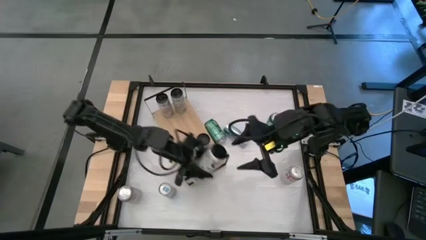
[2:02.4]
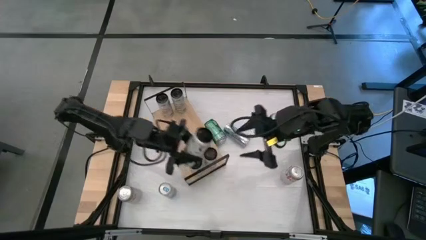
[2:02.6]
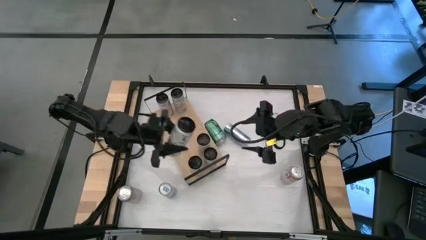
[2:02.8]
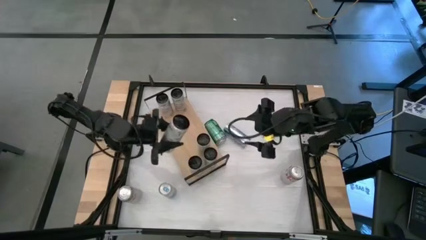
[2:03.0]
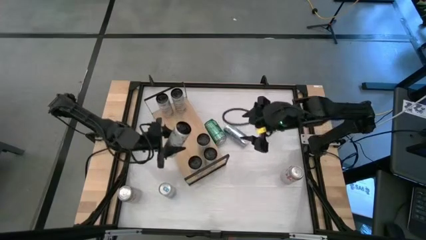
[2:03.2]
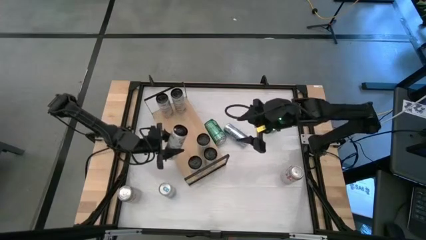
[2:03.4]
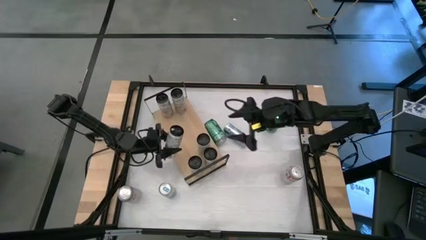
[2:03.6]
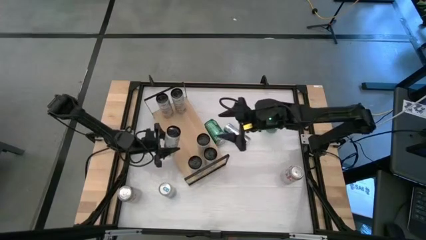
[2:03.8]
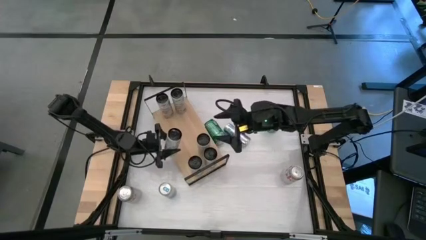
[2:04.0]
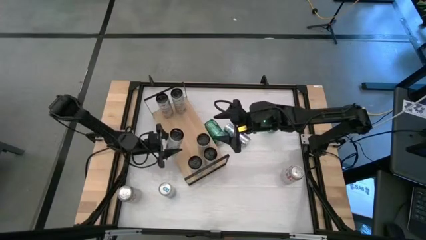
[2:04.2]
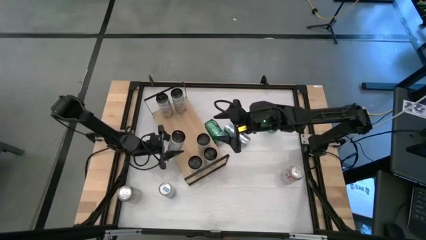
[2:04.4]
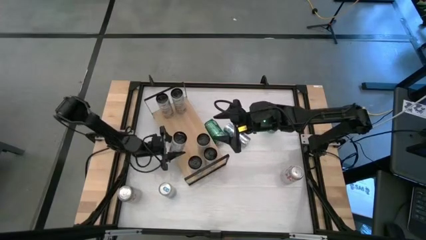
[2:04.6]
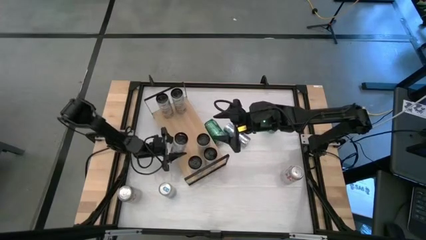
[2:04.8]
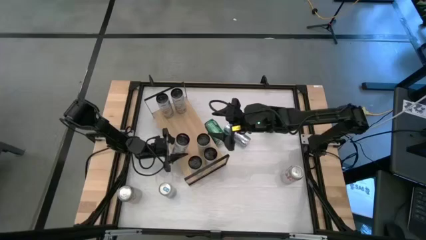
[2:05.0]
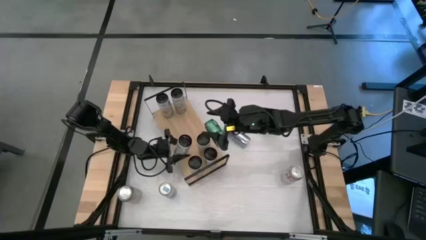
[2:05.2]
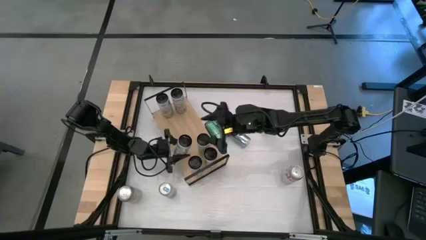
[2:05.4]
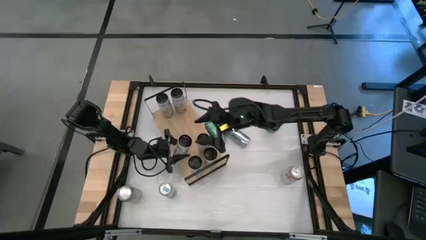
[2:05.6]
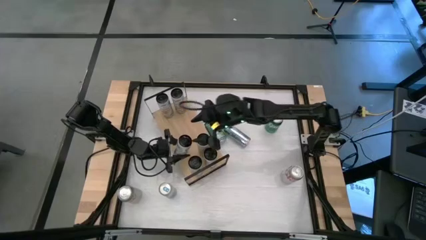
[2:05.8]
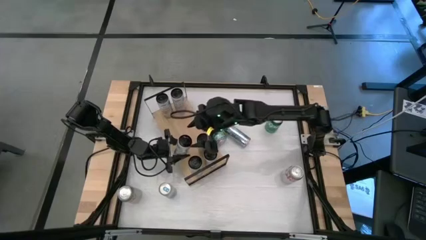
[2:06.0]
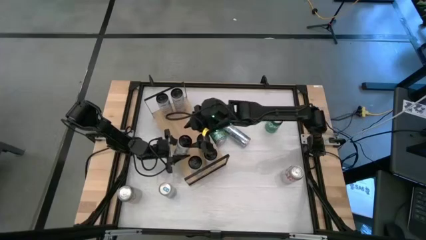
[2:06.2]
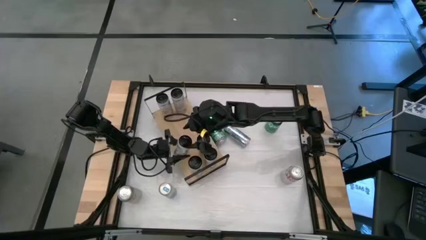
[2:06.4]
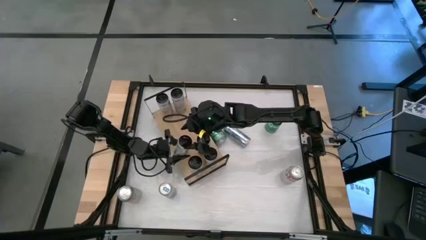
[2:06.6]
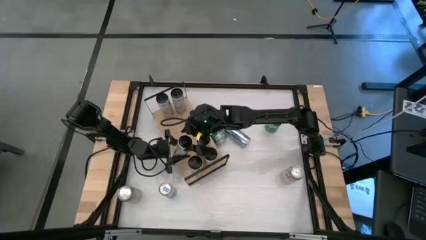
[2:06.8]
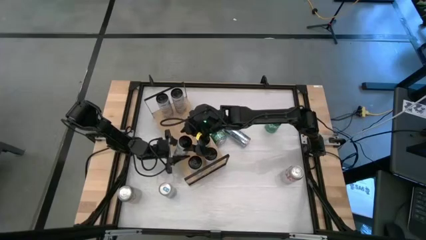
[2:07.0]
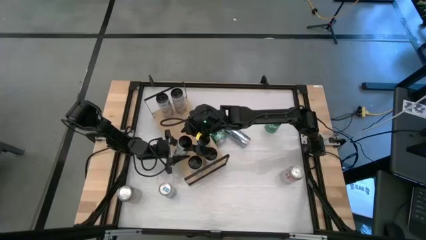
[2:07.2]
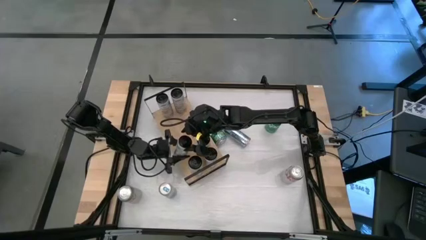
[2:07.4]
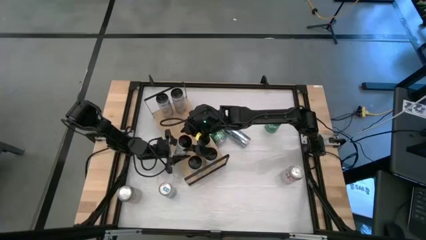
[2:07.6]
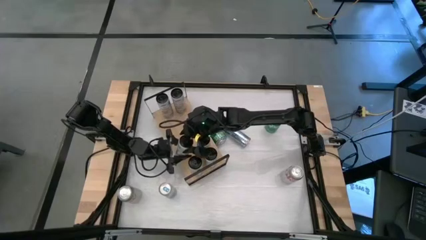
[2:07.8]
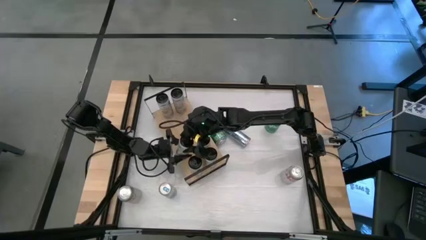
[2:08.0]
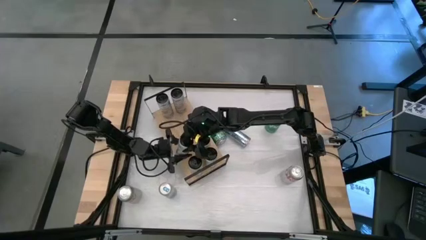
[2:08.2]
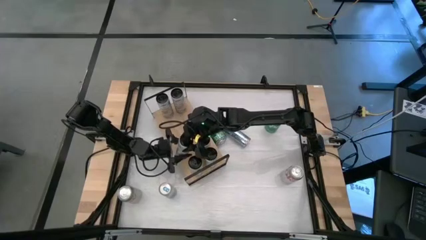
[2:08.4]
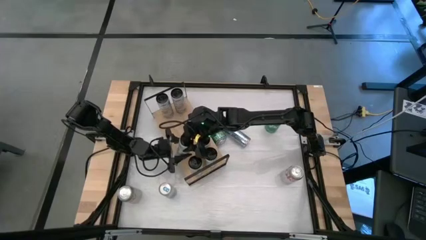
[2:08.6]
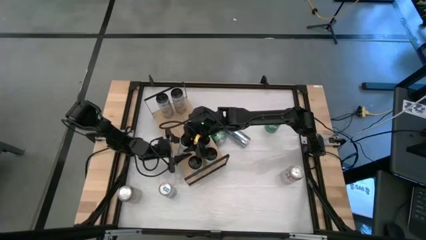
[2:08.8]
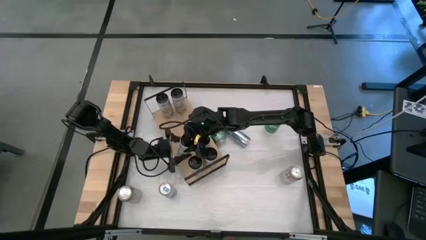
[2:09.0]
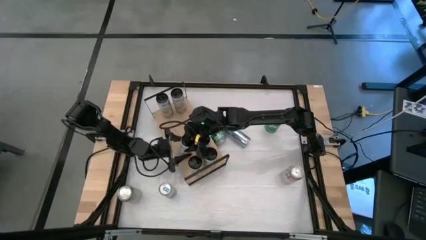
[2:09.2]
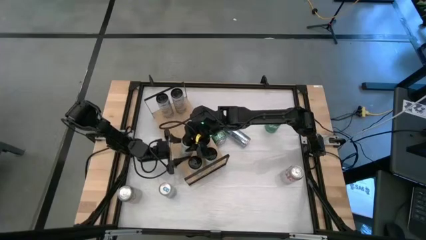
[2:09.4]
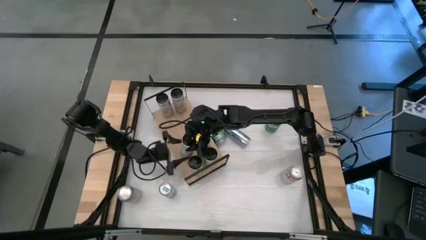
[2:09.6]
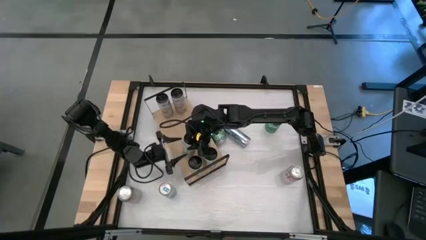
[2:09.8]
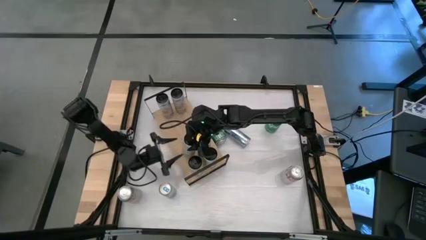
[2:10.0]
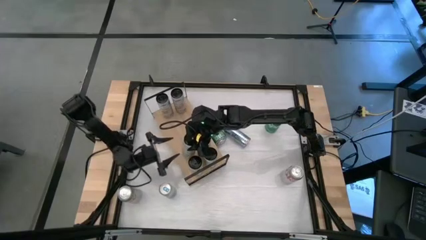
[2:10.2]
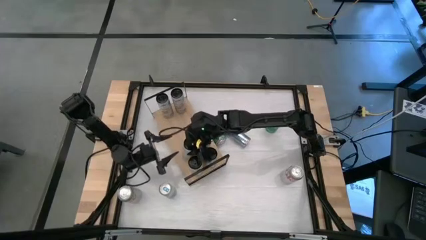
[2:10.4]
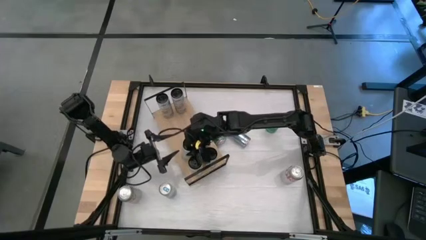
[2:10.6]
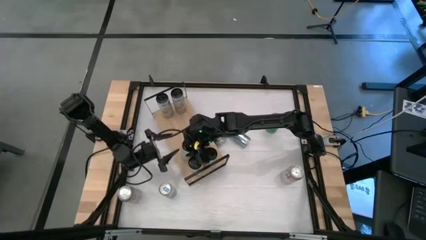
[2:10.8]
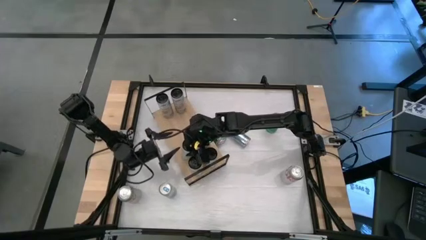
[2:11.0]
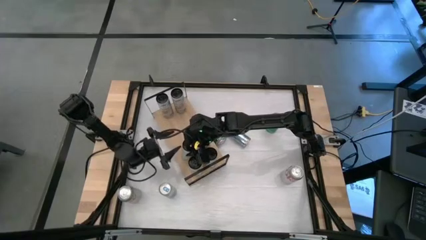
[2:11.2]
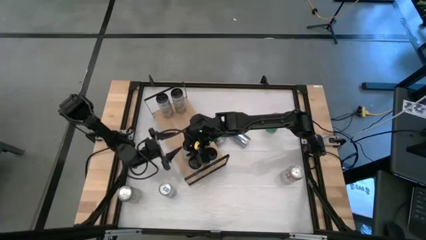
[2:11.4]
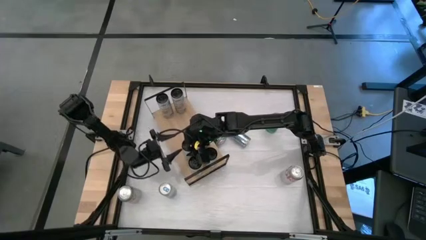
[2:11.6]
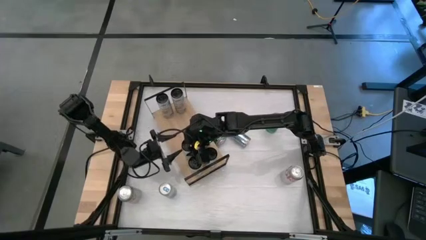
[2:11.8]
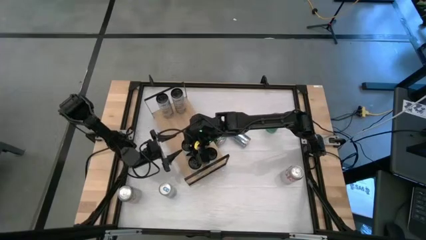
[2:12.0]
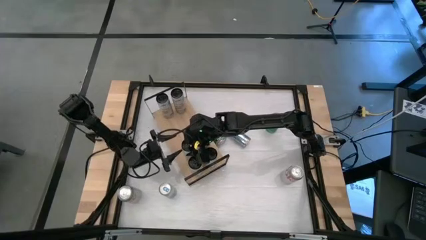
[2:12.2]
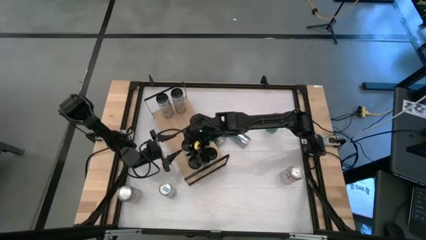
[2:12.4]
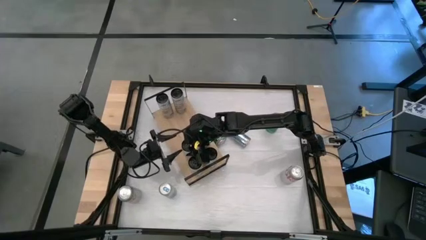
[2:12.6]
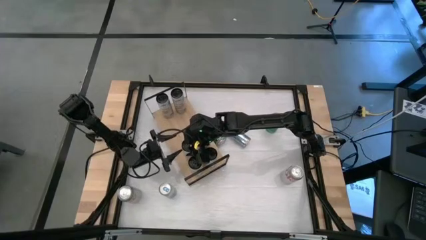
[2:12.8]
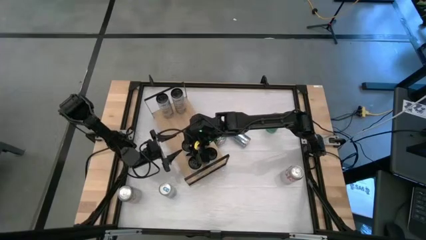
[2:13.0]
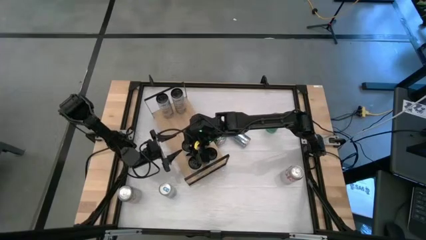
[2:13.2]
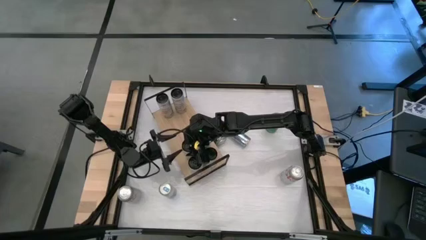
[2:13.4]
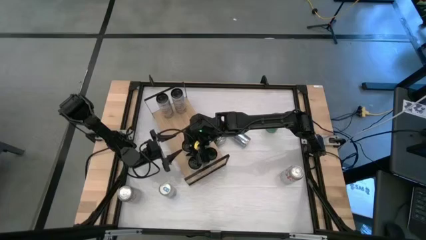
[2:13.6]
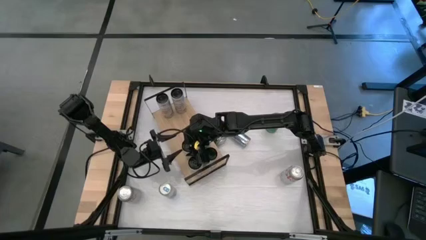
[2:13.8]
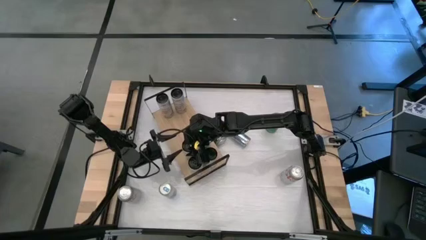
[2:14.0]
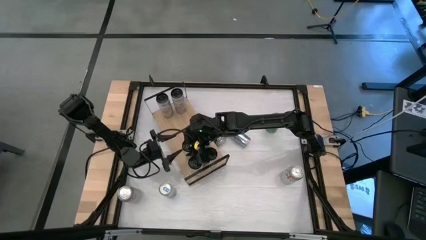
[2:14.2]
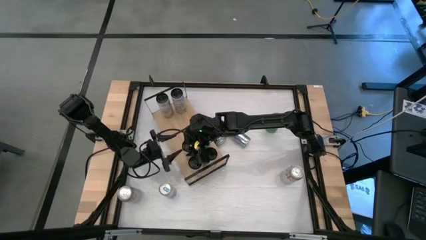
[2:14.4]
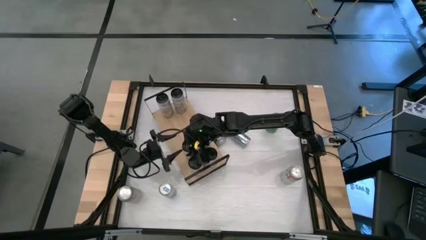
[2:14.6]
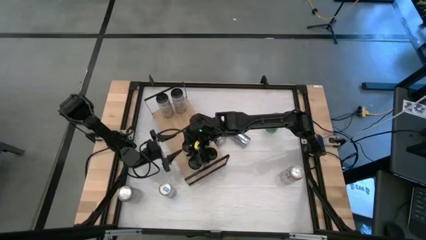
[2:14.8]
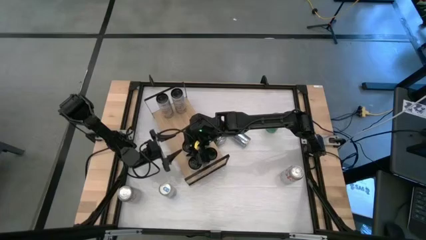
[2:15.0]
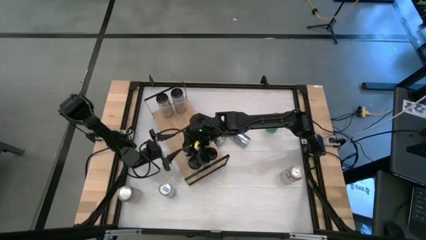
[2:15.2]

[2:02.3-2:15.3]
Task: Place canned beverage on shelf
Put the white yellow soda can on the shelf aligned with the other white yellow soda cans
